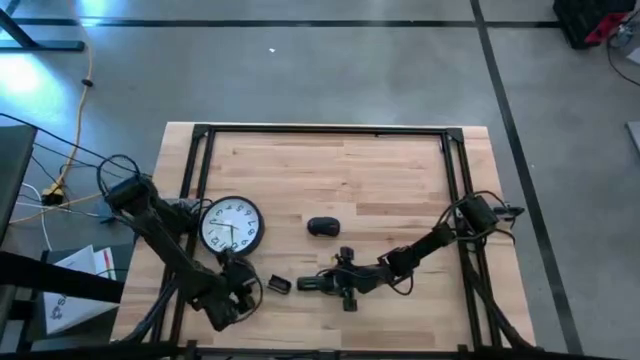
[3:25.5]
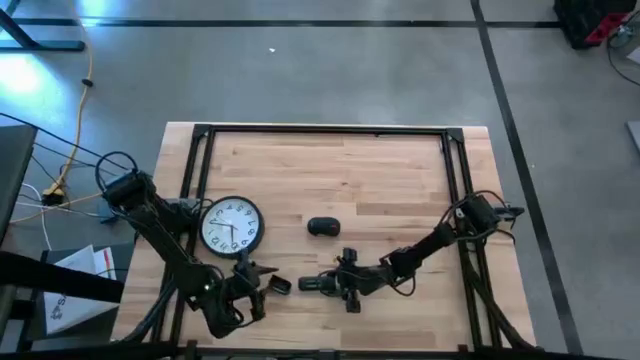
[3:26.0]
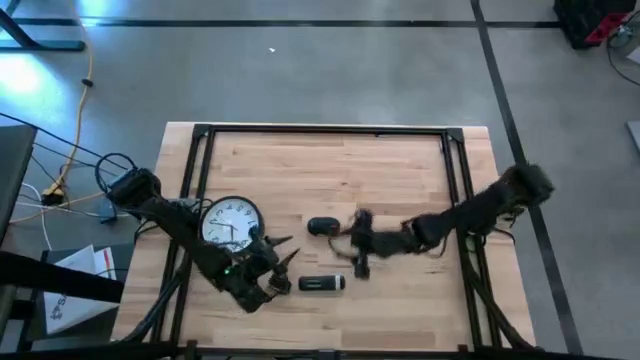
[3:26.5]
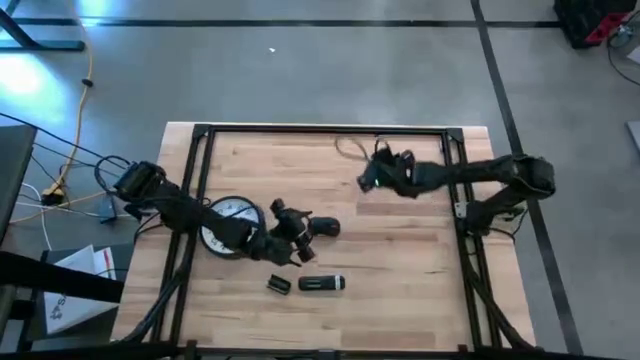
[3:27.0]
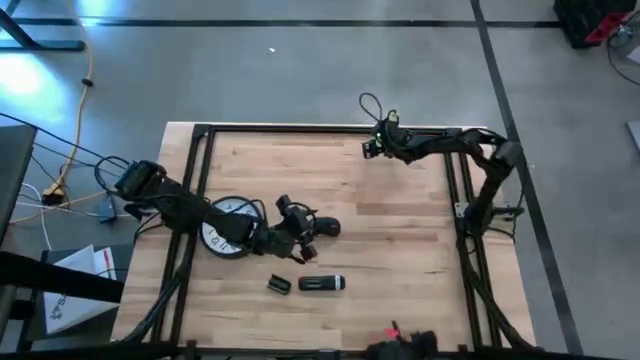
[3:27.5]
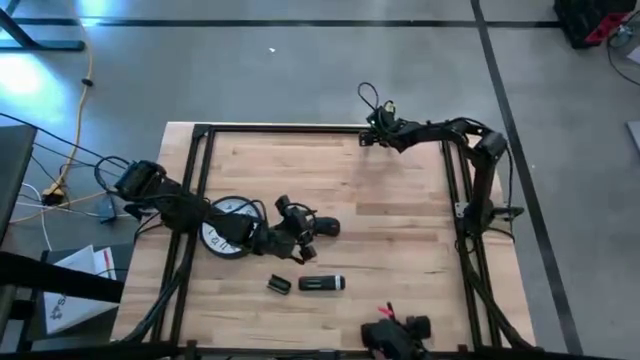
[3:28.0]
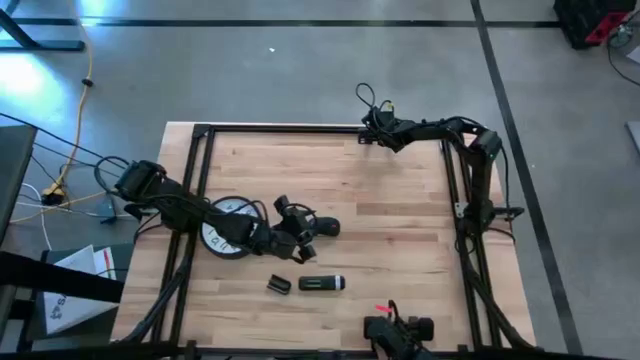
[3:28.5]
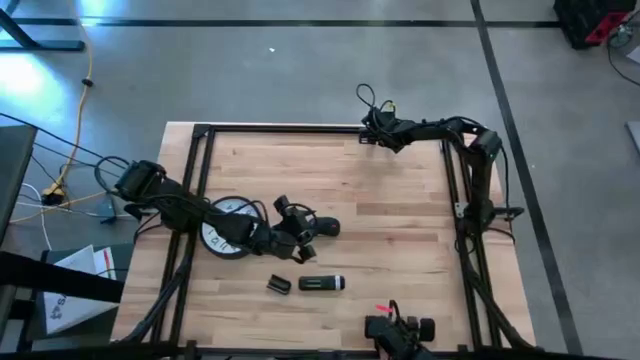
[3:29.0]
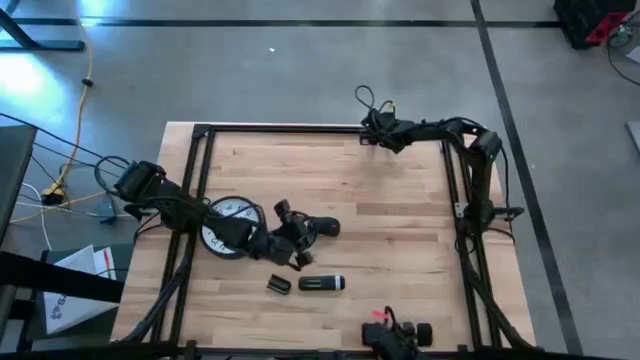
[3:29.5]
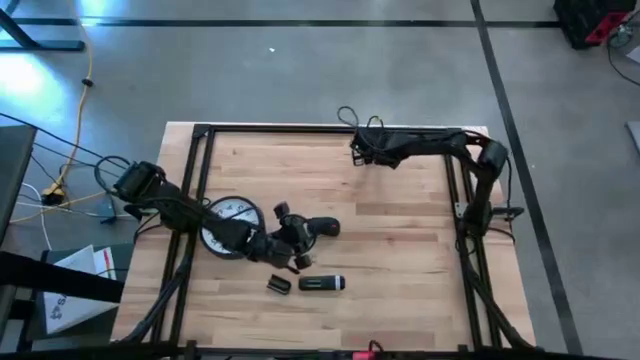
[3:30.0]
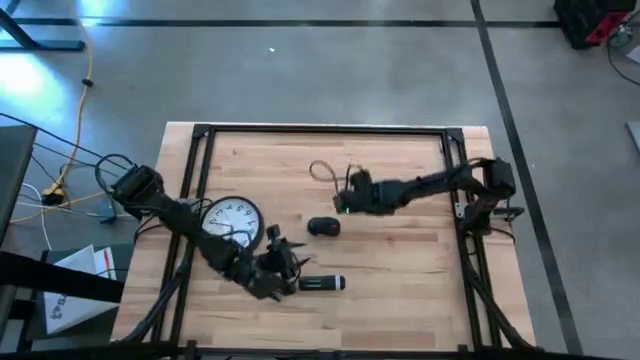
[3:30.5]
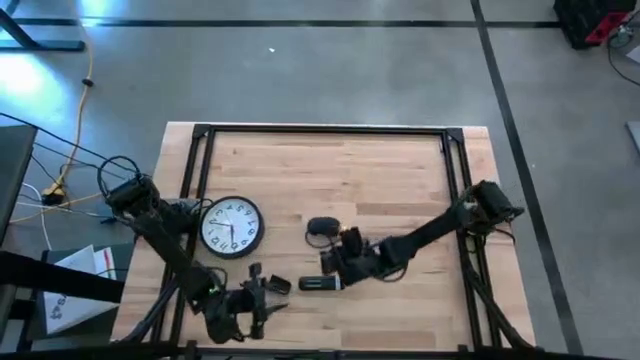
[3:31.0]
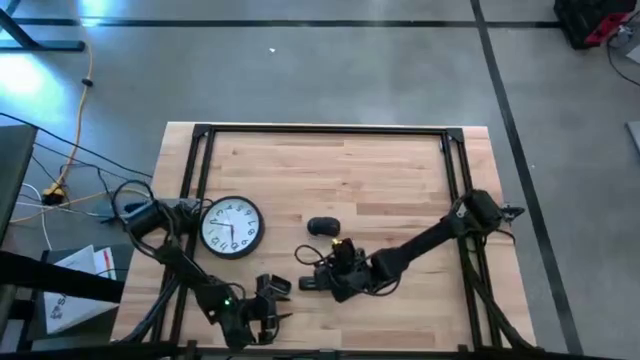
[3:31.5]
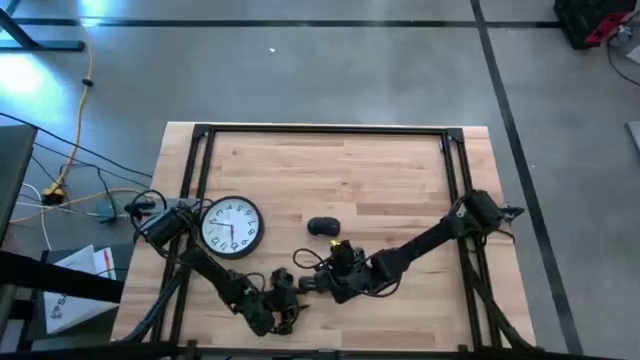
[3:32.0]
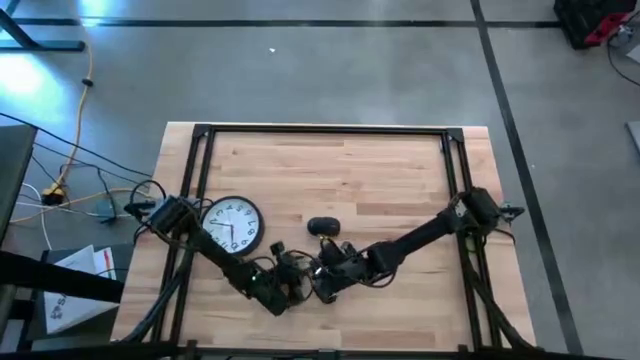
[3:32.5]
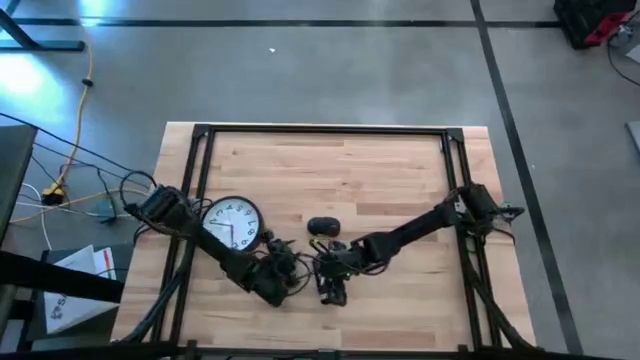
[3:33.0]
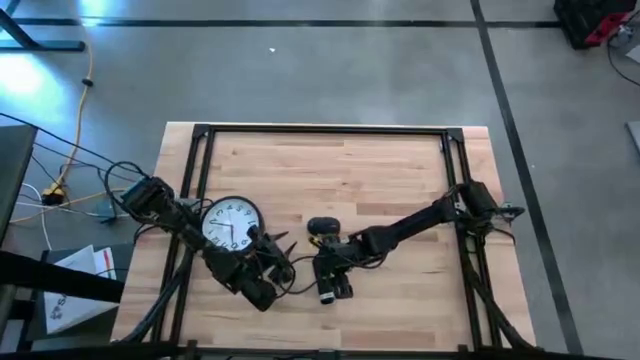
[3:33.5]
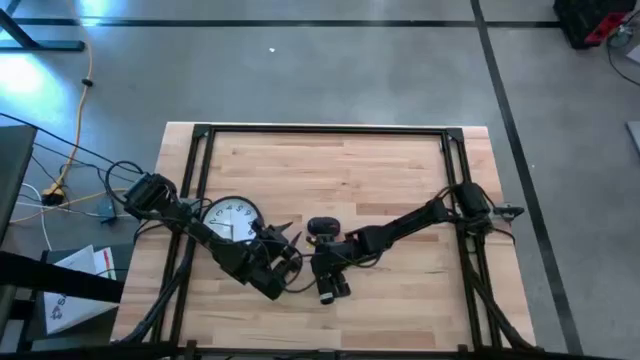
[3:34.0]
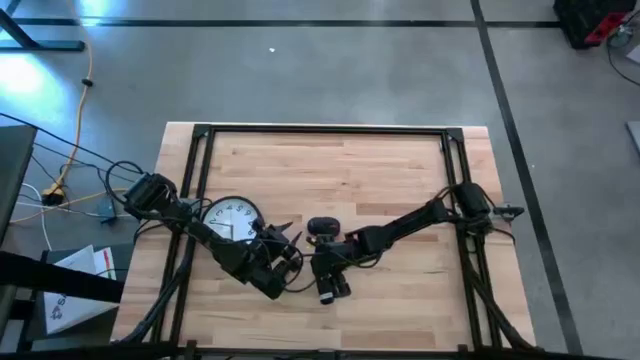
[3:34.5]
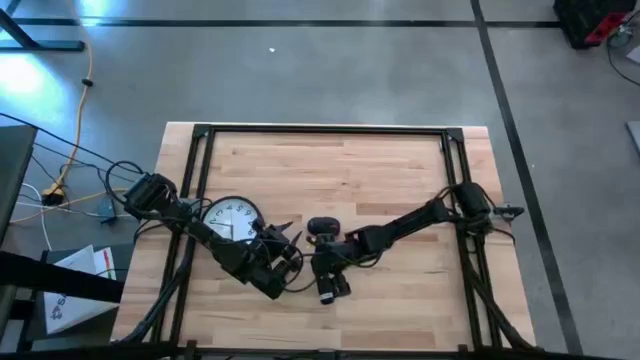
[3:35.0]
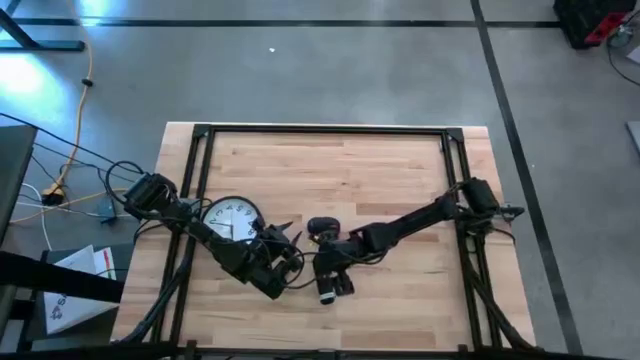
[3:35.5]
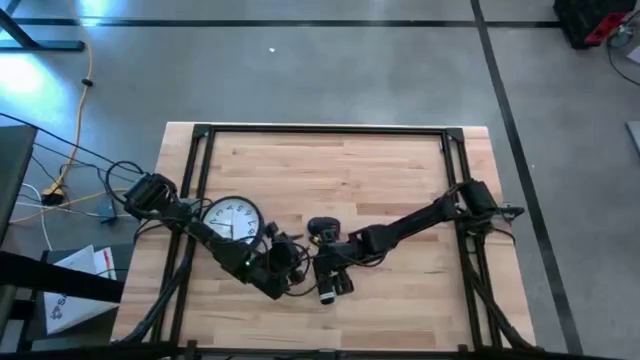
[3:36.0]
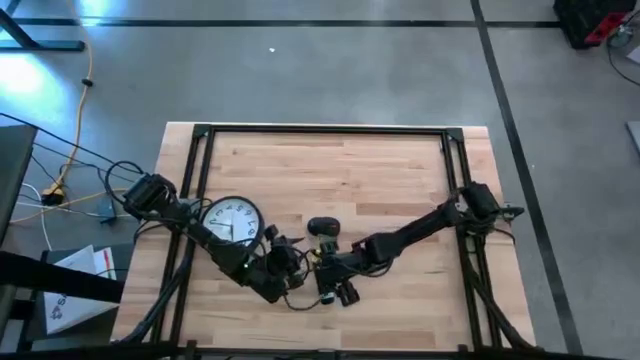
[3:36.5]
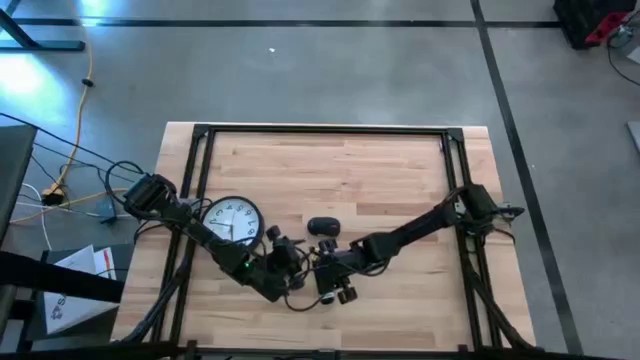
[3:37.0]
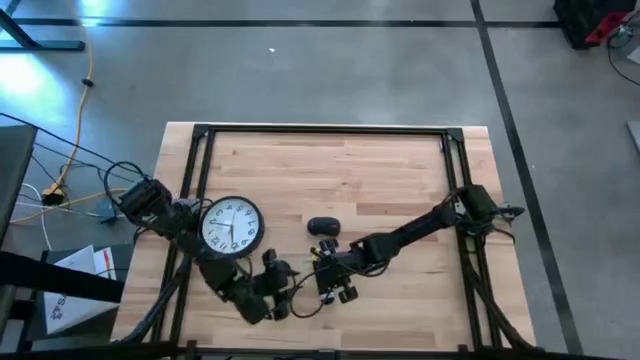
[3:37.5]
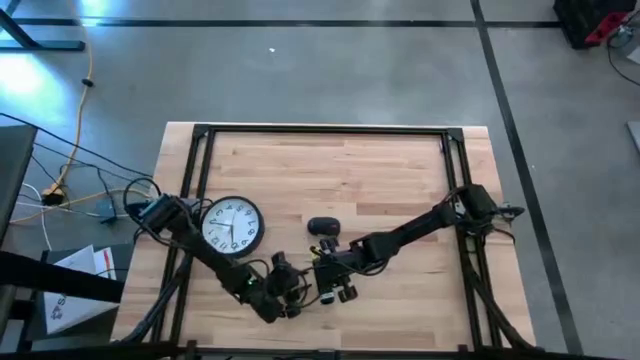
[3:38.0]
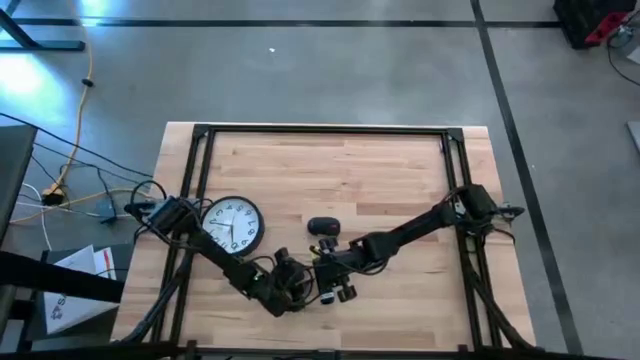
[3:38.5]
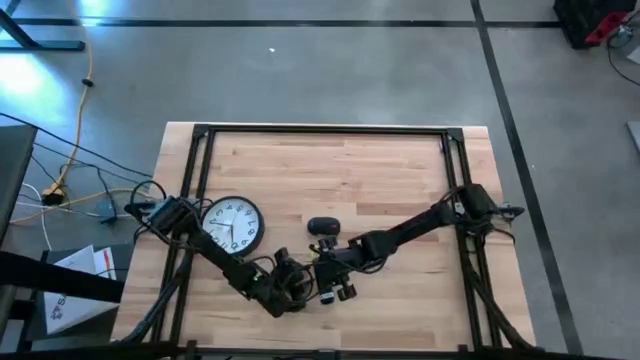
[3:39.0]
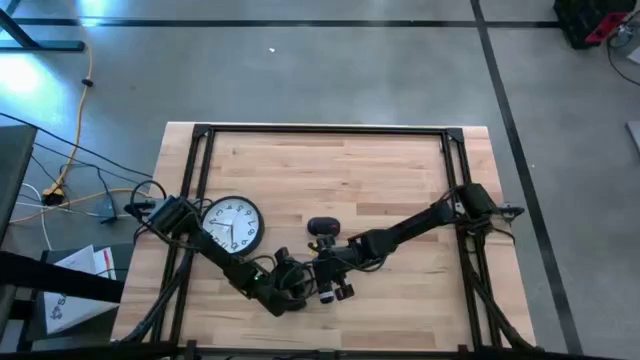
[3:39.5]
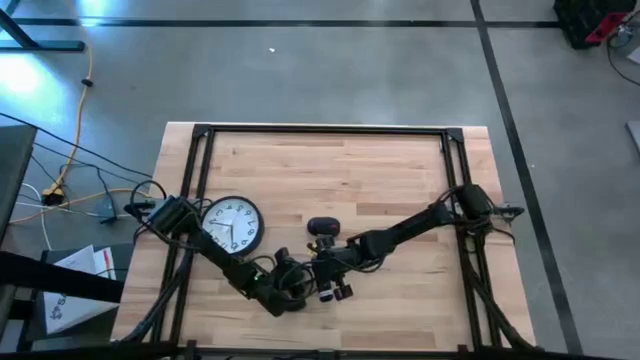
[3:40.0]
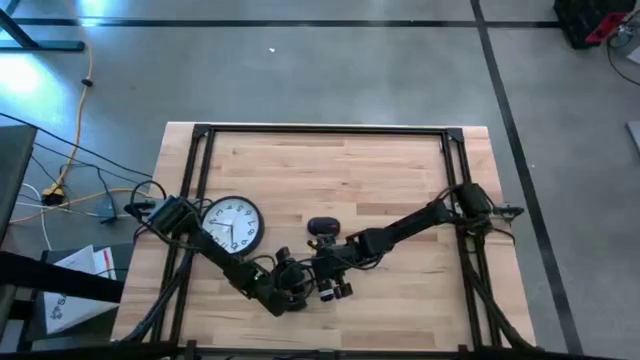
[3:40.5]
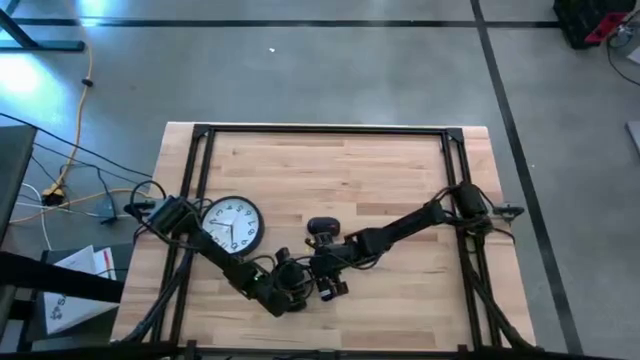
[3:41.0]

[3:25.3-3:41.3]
Task: Insert battery
Insert the left silver battery into the black remote

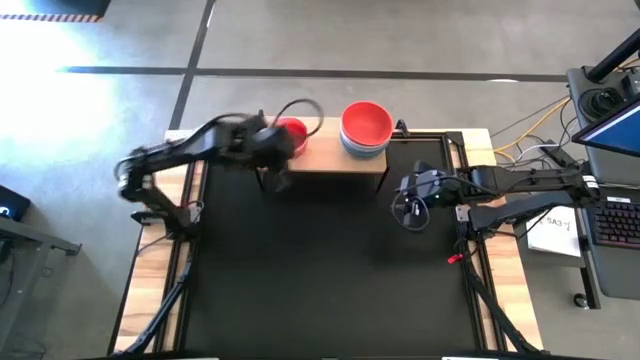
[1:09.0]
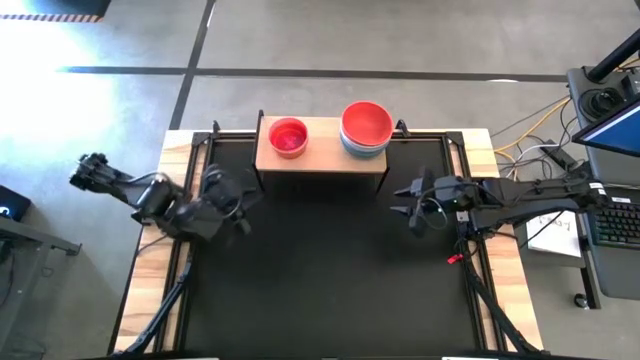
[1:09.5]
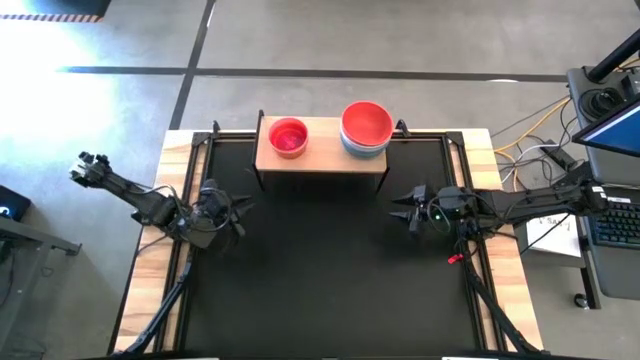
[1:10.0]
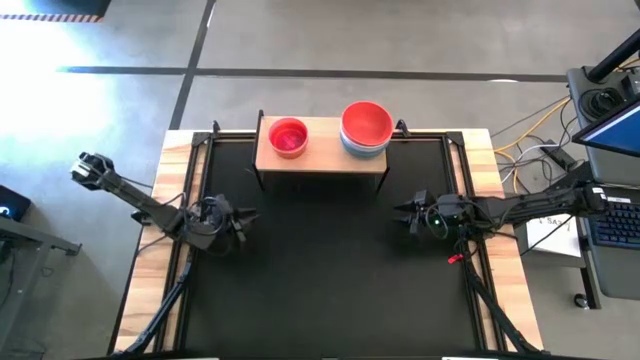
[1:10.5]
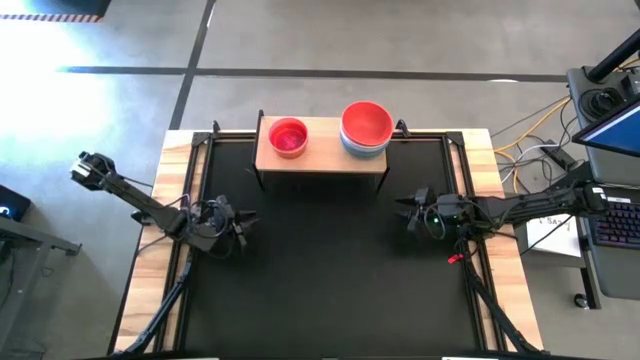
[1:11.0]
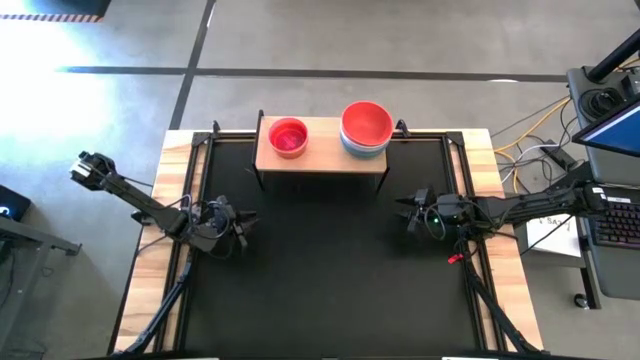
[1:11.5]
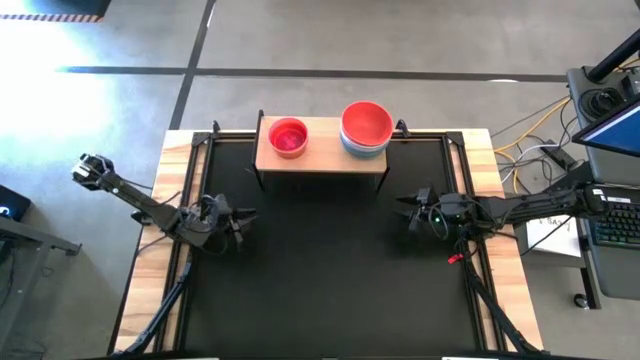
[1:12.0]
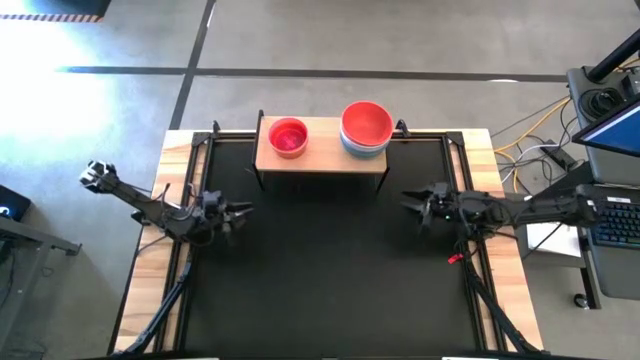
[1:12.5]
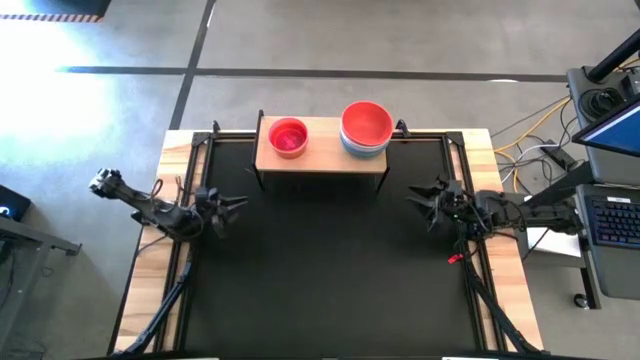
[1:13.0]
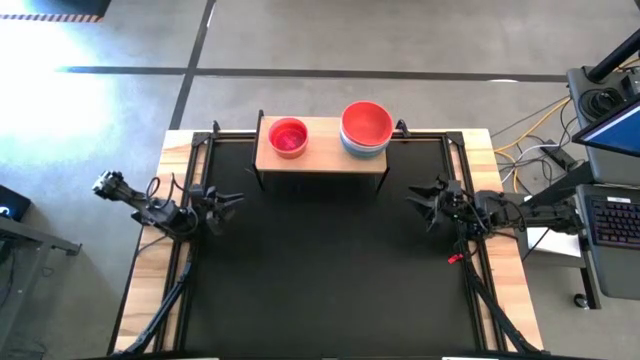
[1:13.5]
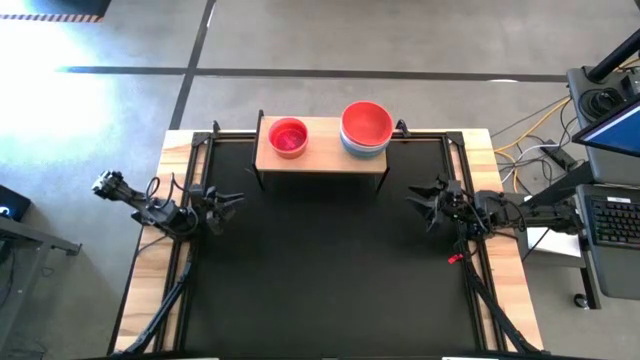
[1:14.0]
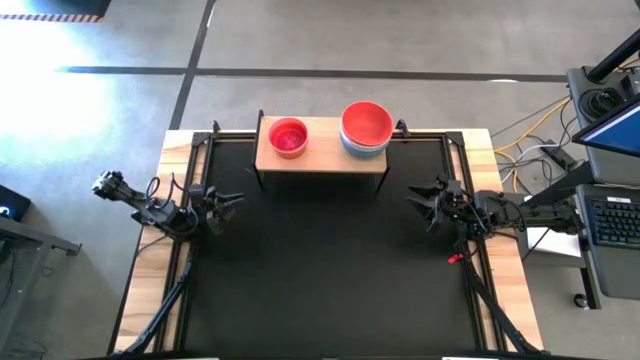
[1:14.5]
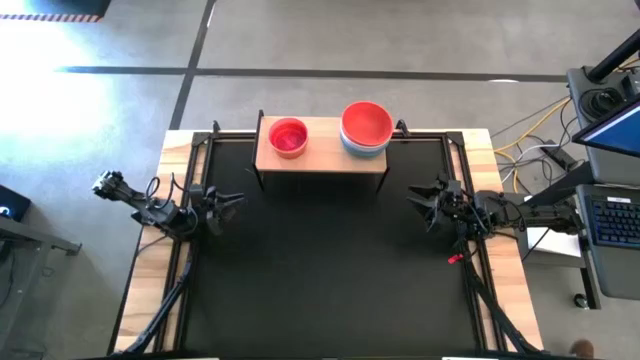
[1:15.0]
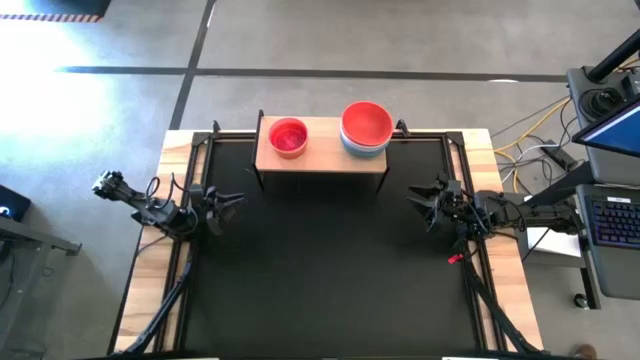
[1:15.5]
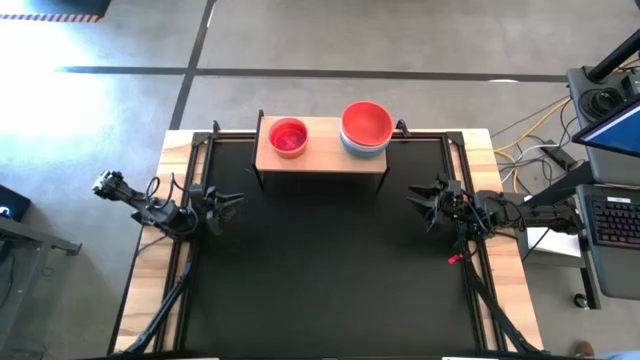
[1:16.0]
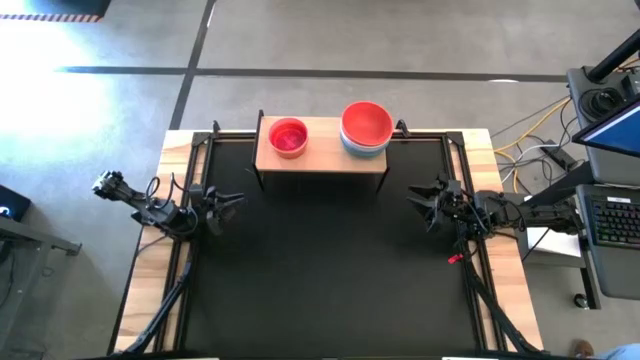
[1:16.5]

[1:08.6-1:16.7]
Task: Place and stack bowls onto a shelf
Return to Home Position
